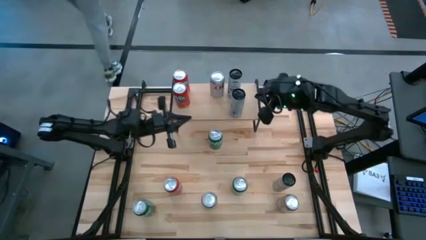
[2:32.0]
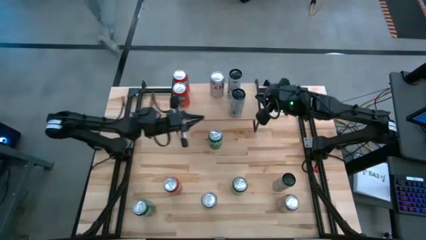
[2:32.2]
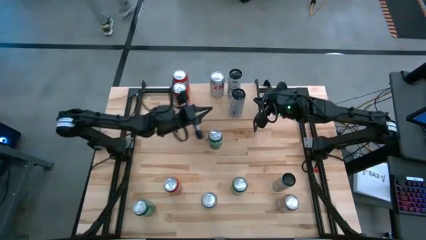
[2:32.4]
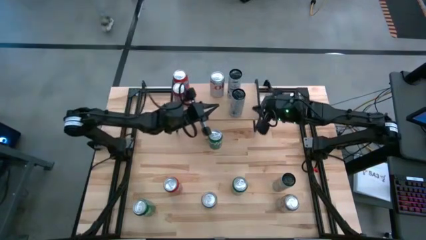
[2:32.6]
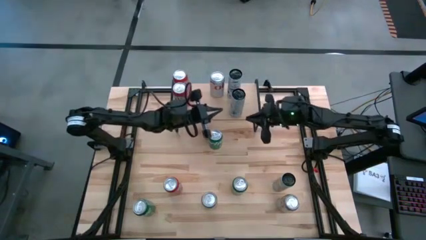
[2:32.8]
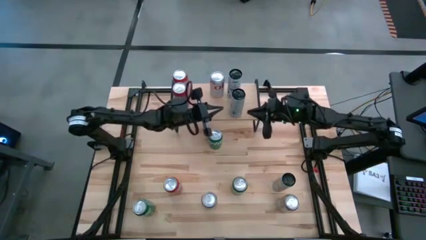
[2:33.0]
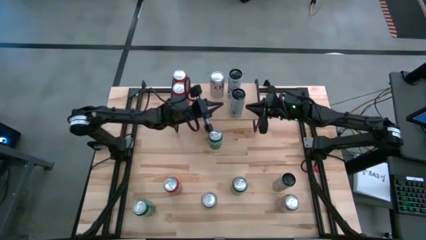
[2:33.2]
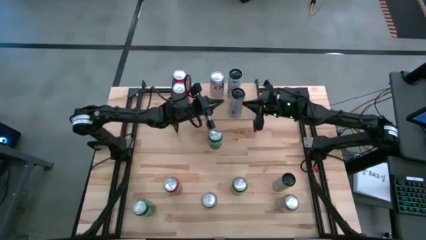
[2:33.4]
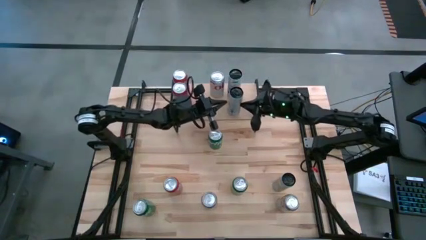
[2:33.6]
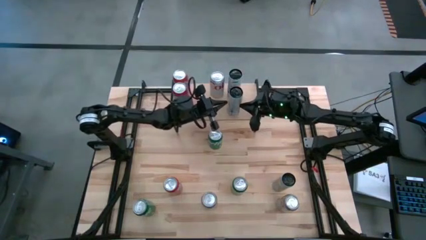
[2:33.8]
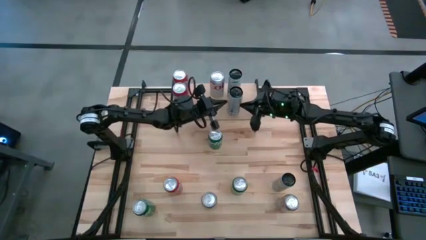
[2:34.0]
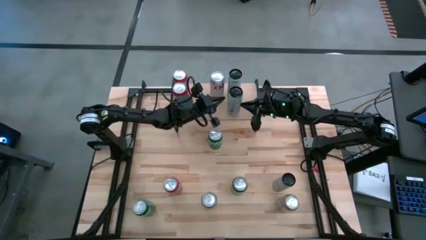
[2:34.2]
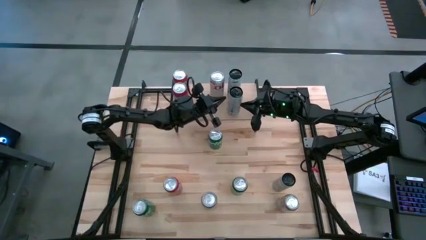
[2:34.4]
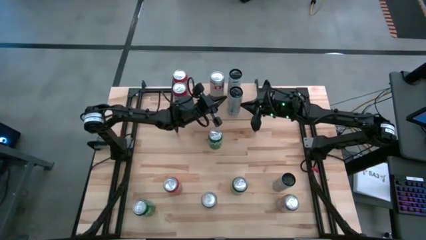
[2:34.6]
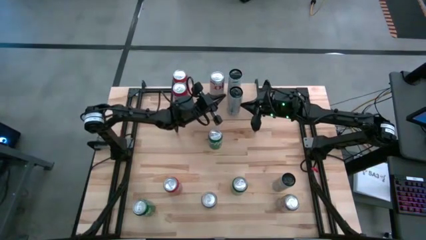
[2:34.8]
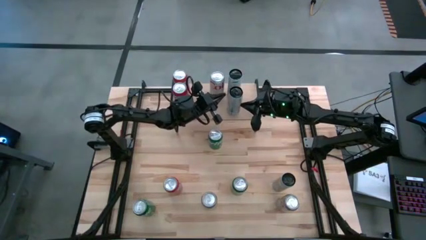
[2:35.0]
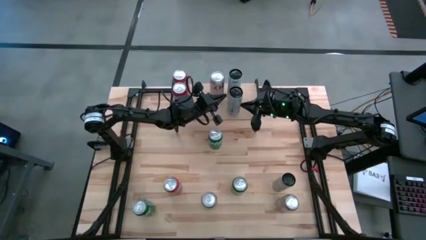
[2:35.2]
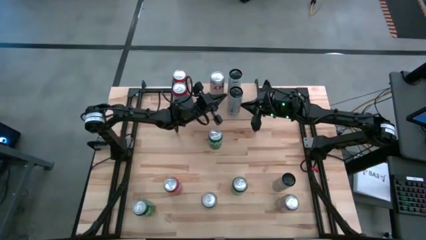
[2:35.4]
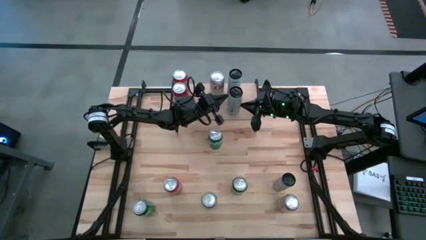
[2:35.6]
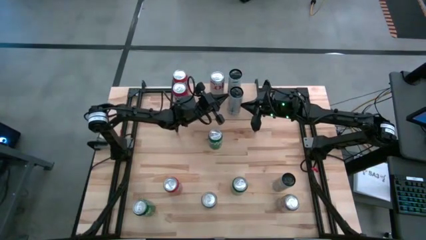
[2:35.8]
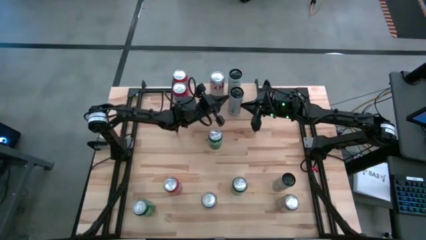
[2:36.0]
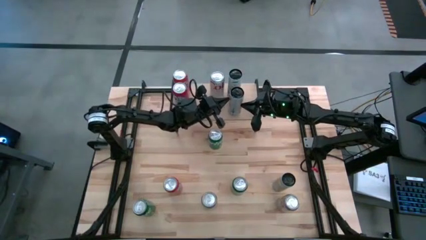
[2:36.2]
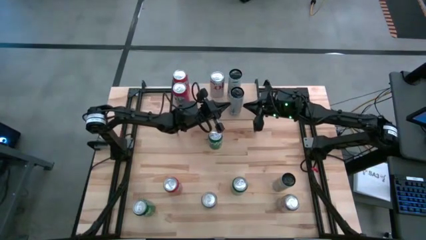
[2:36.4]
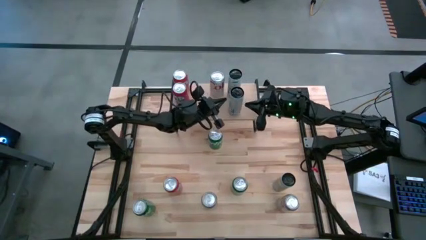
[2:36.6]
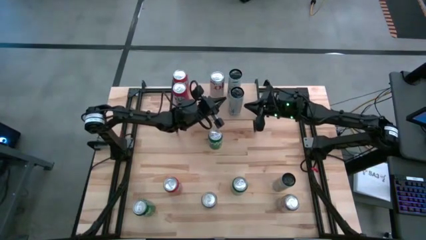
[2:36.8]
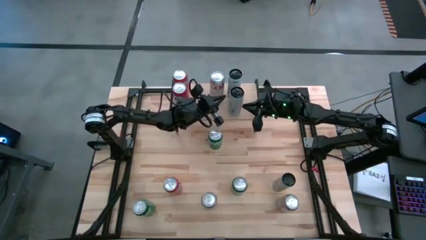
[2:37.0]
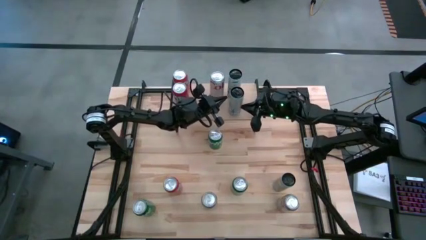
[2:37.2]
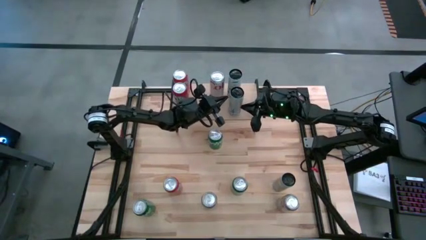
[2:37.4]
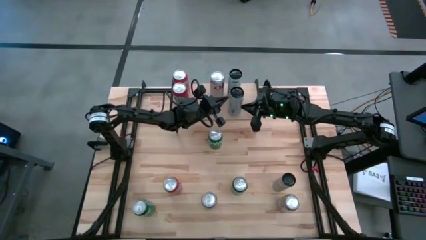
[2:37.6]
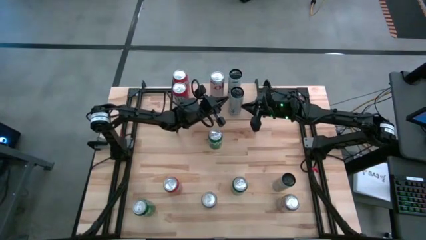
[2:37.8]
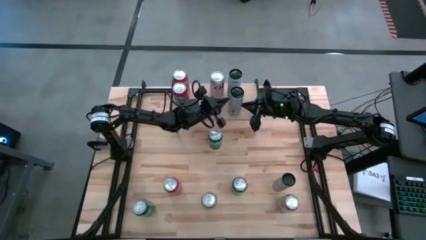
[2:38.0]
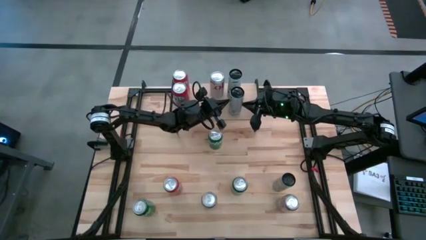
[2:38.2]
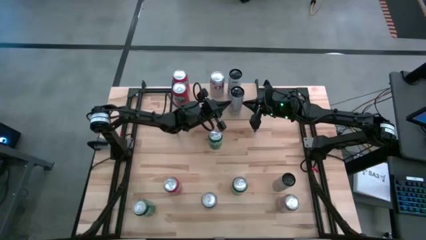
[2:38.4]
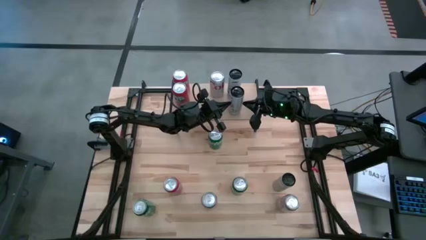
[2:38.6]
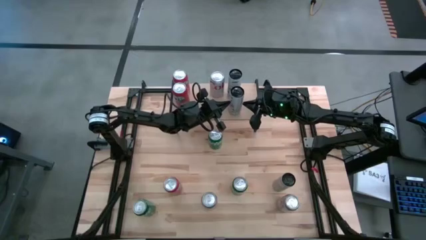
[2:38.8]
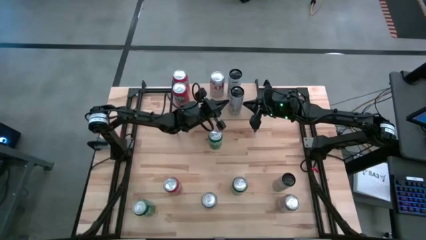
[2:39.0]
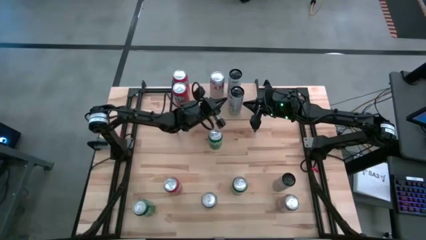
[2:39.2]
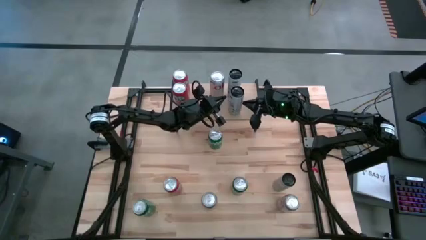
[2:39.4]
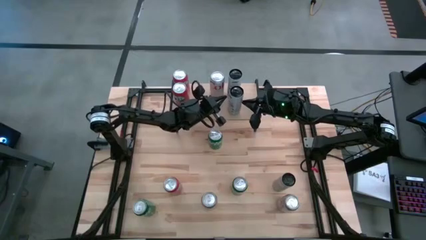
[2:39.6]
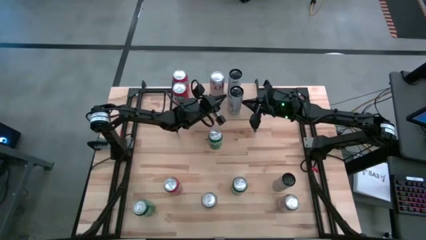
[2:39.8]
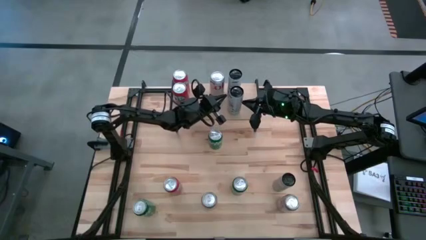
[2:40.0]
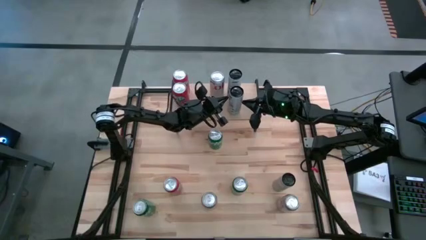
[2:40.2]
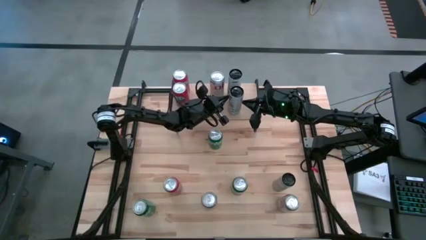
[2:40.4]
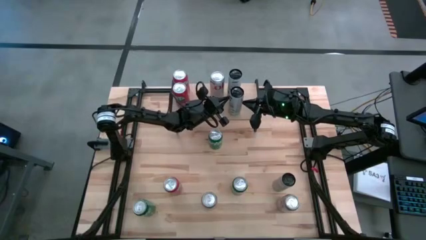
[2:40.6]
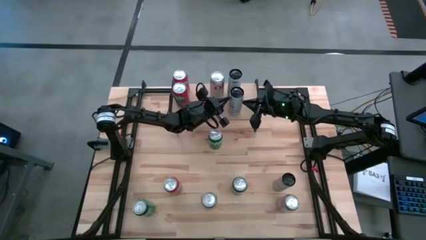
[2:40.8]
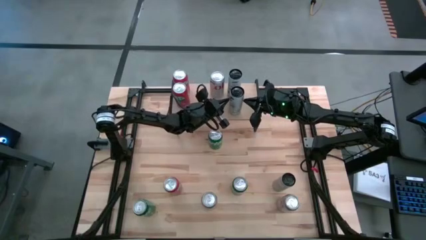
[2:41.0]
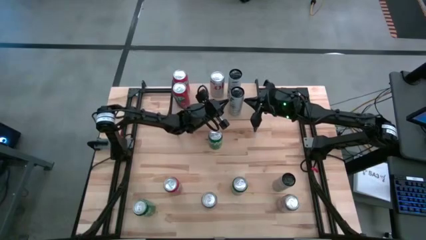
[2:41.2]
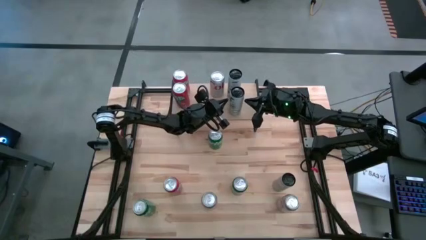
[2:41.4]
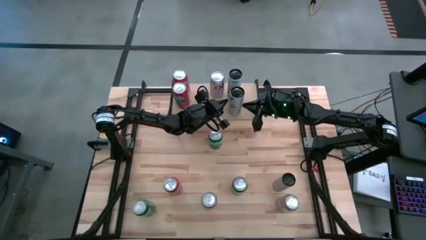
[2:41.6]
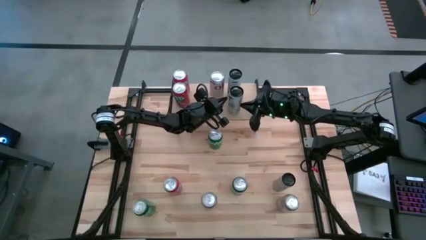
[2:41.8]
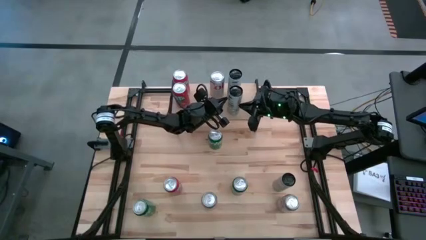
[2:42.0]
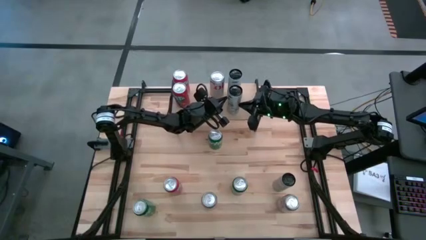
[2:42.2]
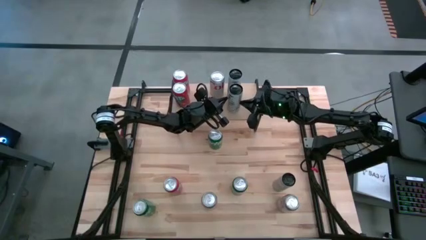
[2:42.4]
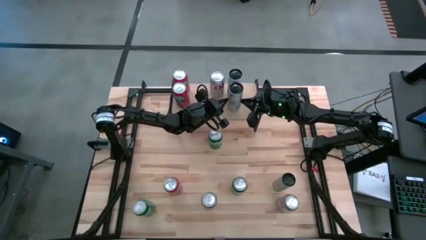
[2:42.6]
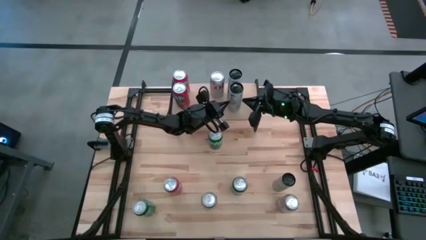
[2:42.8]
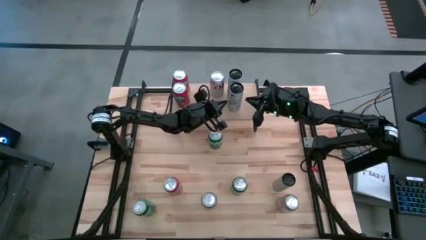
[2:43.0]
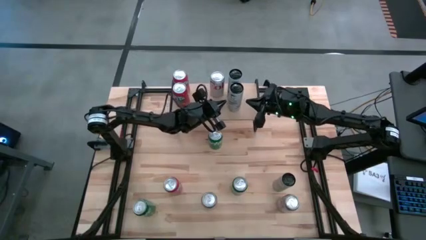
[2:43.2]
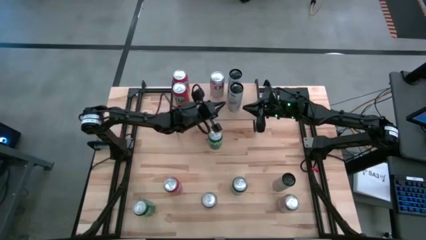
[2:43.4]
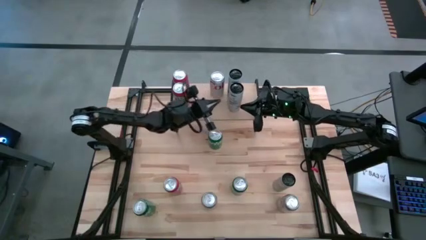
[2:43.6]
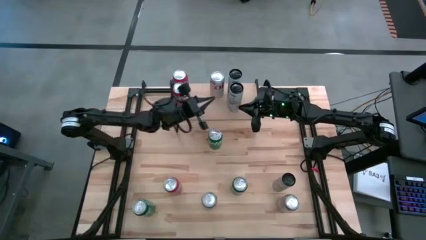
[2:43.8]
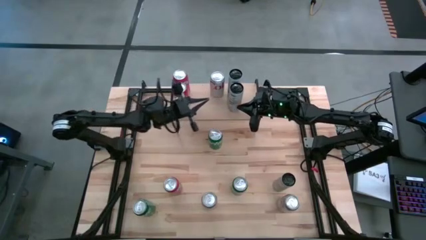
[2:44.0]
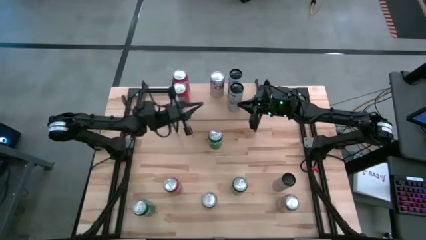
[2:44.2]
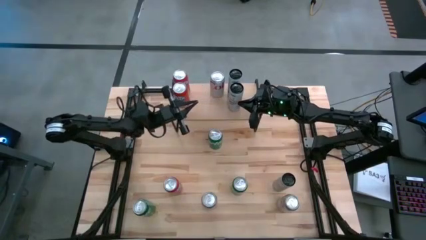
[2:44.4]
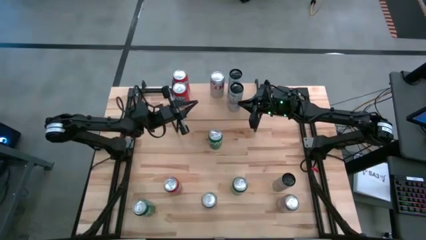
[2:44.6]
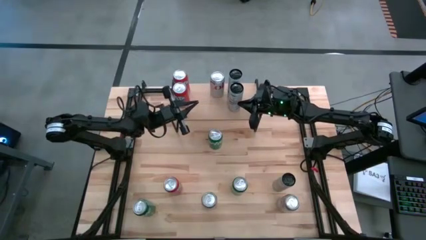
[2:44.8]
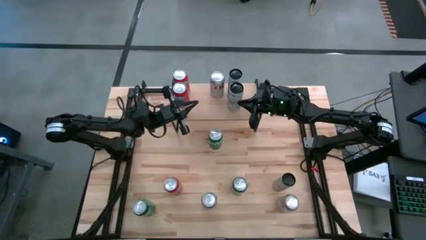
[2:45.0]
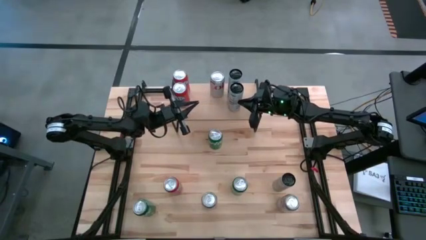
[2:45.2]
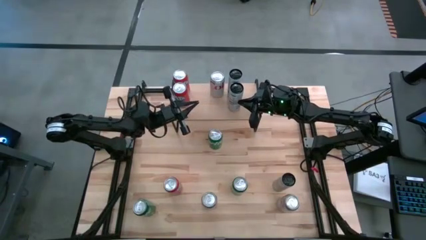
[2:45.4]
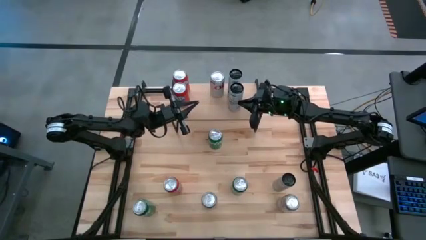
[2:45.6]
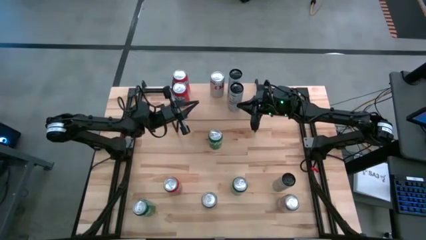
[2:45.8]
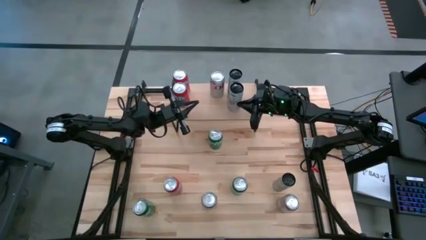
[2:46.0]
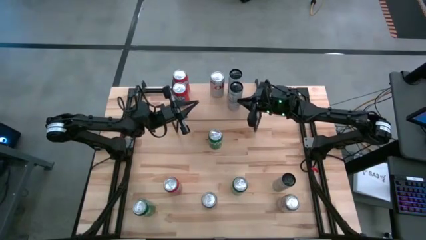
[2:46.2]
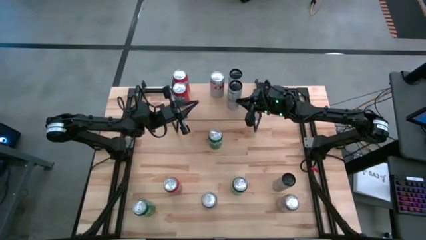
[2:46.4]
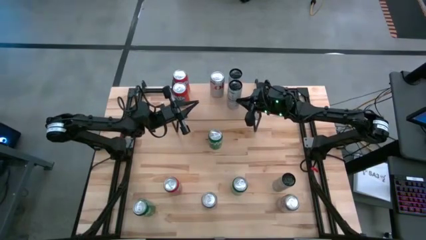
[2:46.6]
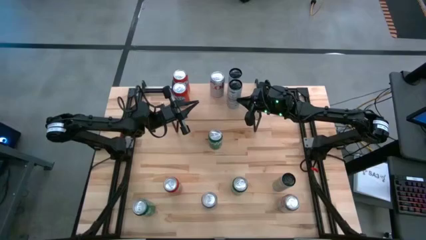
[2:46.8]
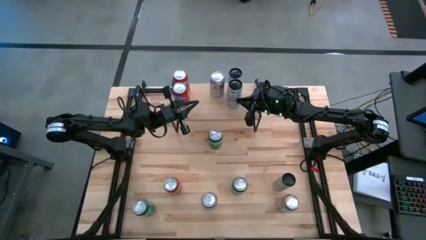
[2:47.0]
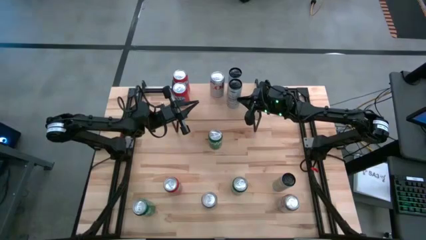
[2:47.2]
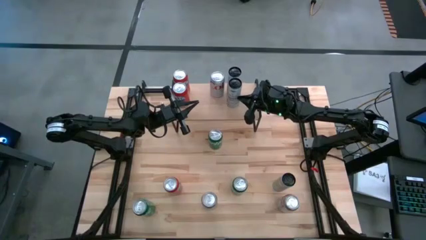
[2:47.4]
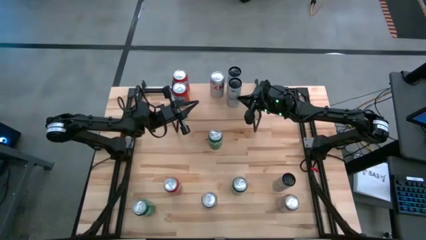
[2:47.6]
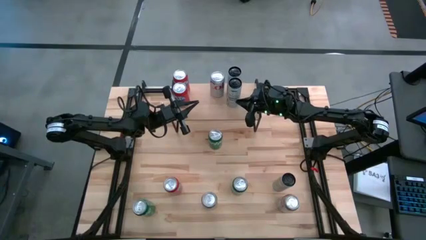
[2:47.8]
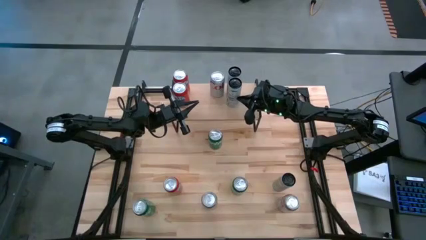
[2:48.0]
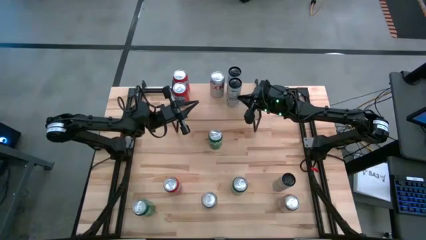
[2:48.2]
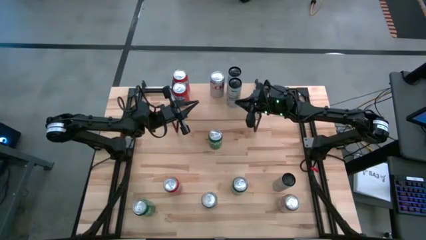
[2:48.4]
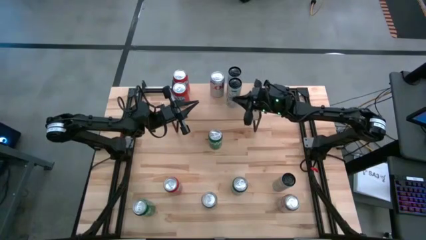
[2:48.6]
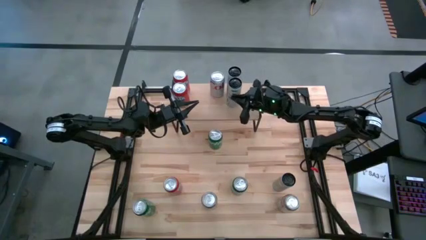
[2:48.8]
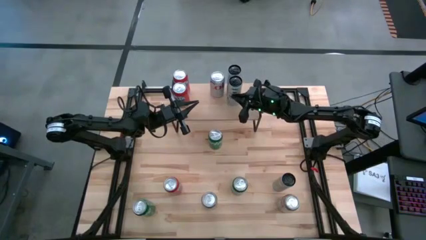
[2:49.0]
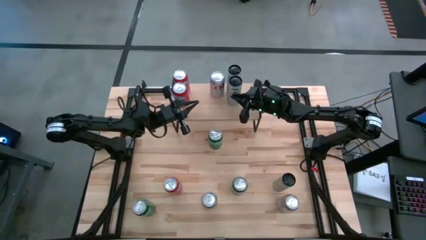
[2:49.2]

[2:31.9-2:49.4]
Task: Place canned beverage on shelf
Put the left white-blue soda can on the shelf aligned with the other white-blue soda can
